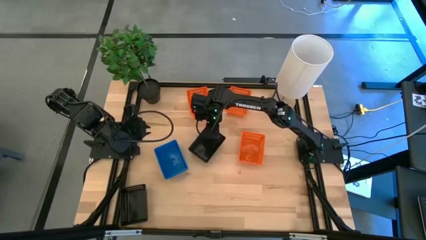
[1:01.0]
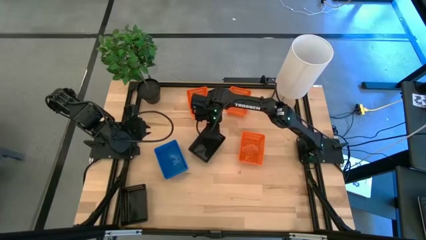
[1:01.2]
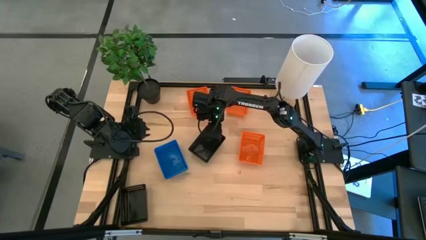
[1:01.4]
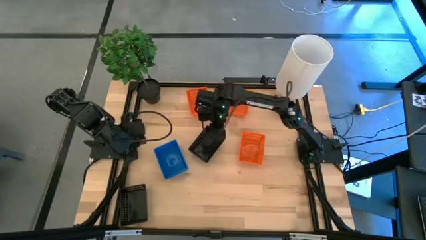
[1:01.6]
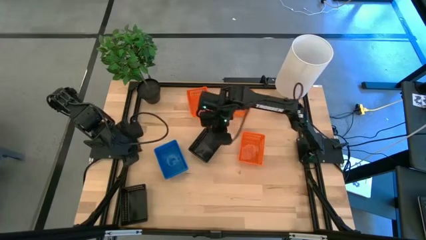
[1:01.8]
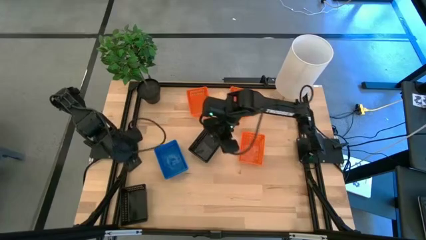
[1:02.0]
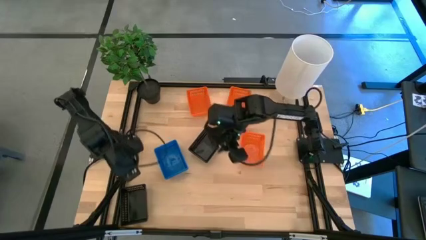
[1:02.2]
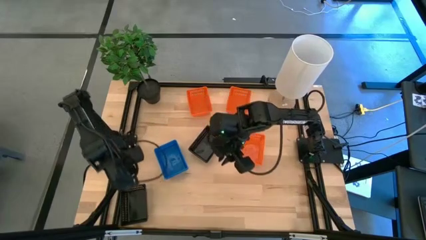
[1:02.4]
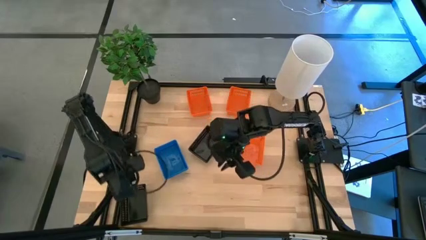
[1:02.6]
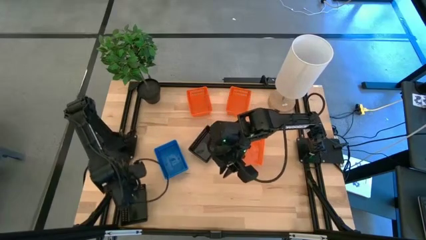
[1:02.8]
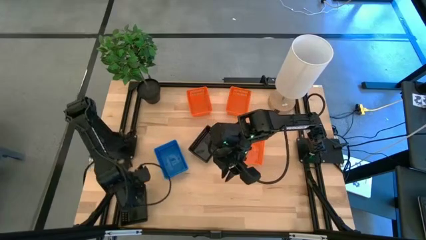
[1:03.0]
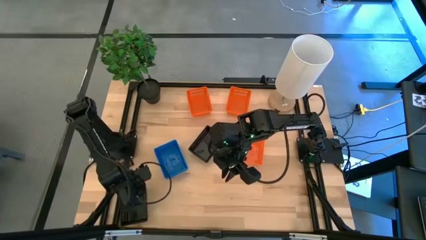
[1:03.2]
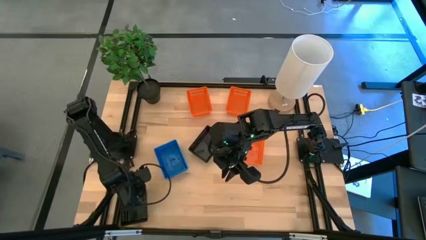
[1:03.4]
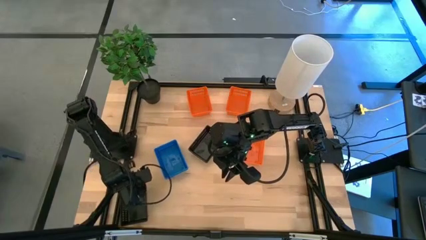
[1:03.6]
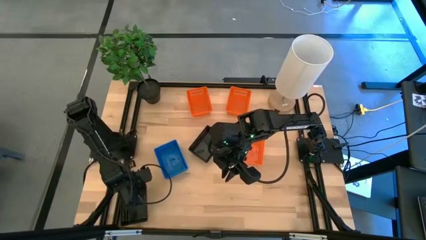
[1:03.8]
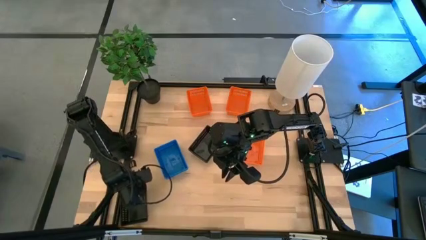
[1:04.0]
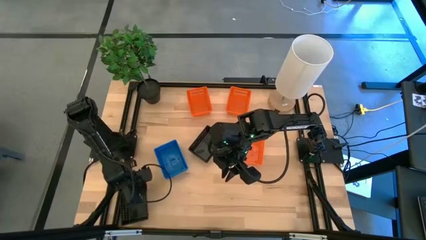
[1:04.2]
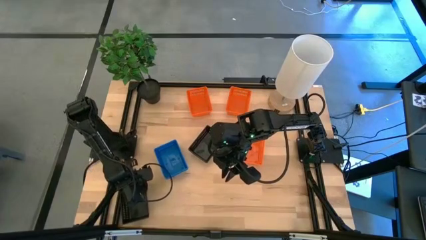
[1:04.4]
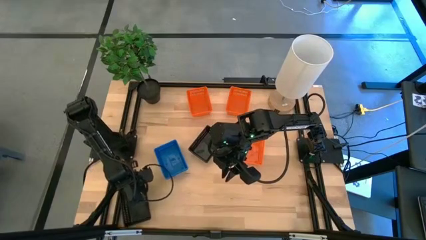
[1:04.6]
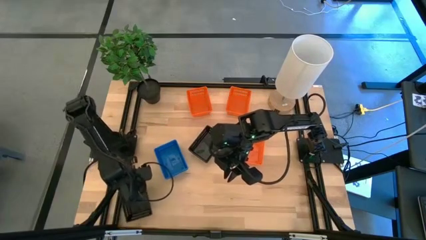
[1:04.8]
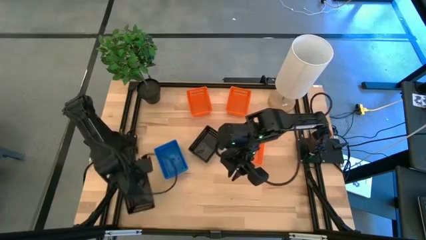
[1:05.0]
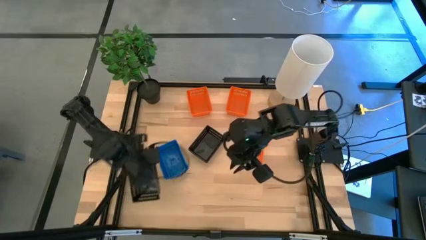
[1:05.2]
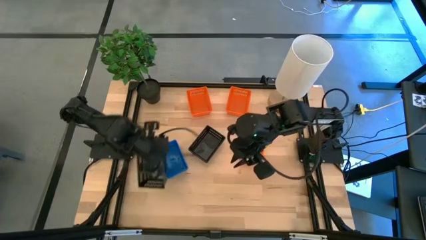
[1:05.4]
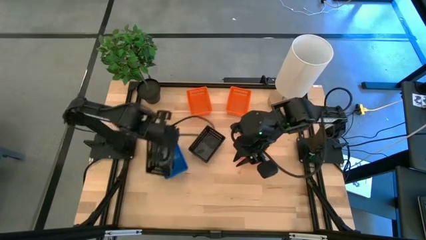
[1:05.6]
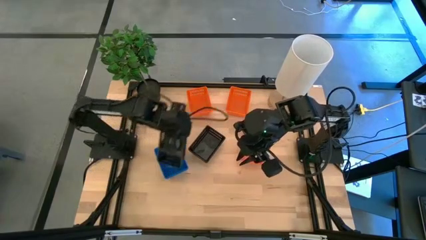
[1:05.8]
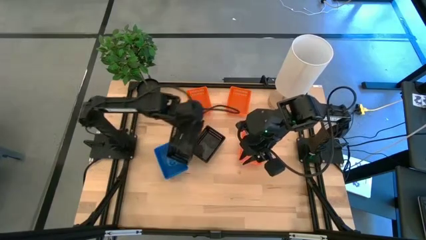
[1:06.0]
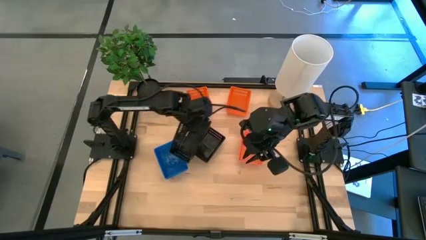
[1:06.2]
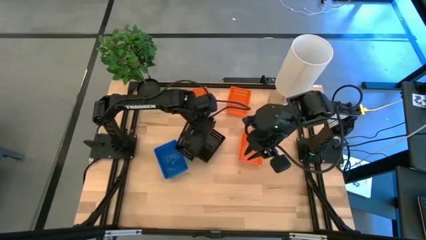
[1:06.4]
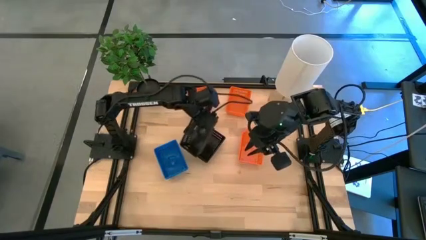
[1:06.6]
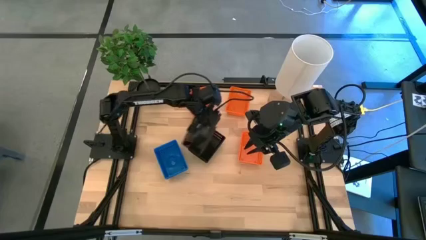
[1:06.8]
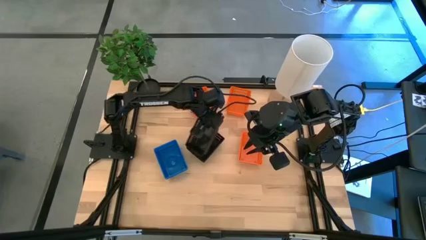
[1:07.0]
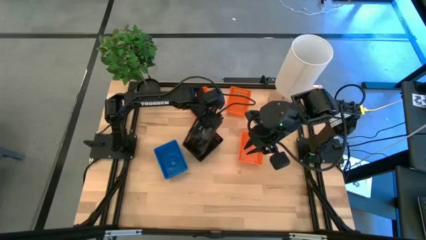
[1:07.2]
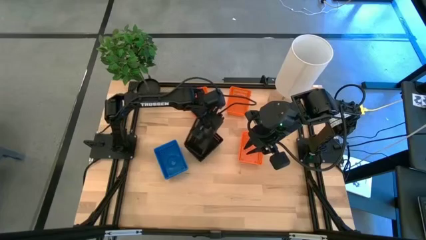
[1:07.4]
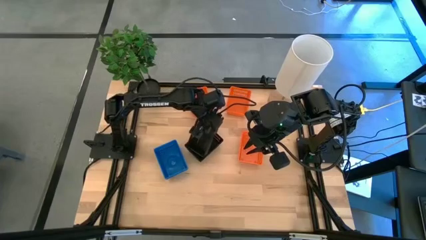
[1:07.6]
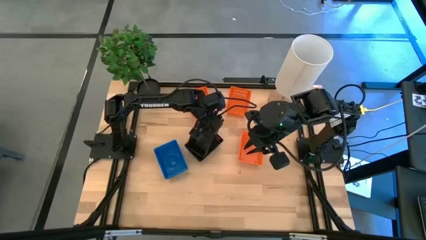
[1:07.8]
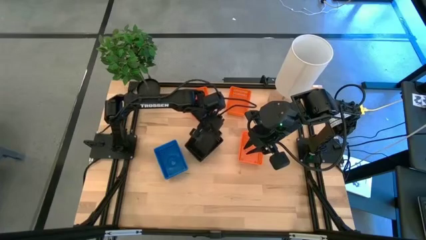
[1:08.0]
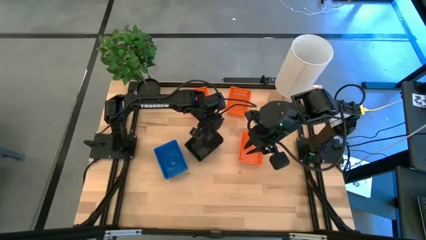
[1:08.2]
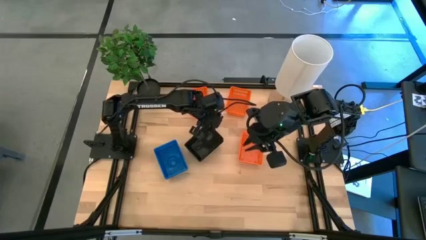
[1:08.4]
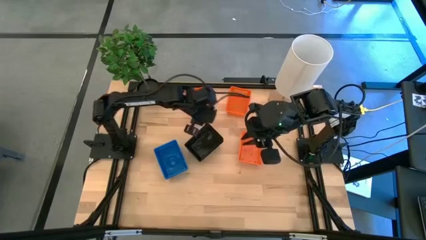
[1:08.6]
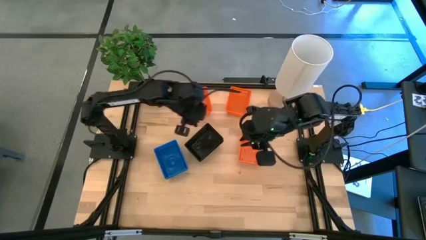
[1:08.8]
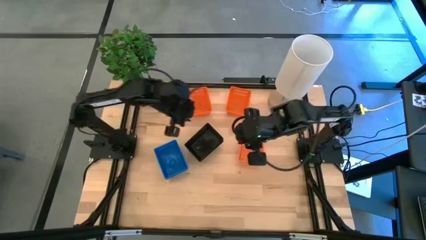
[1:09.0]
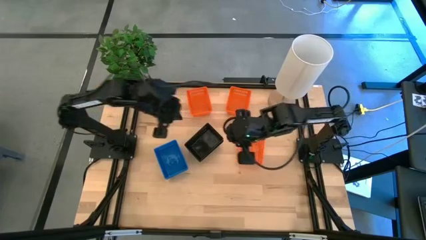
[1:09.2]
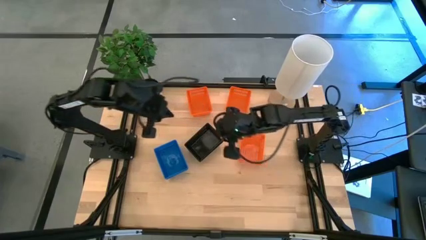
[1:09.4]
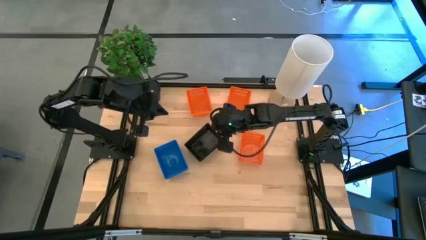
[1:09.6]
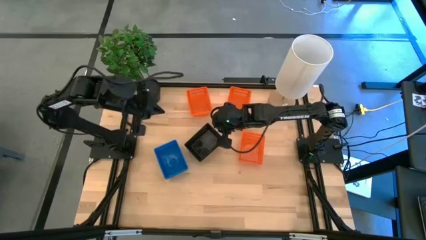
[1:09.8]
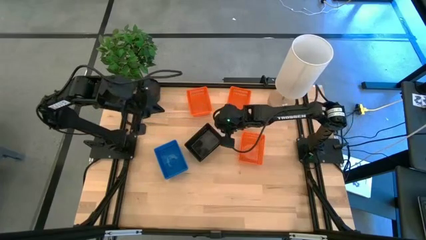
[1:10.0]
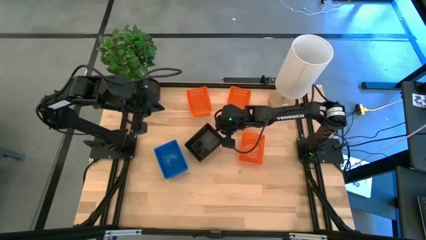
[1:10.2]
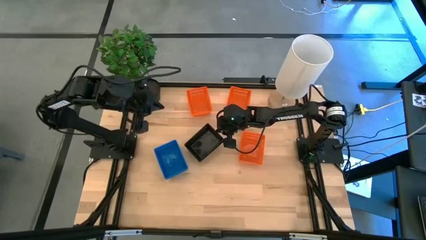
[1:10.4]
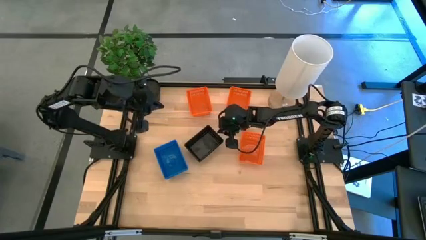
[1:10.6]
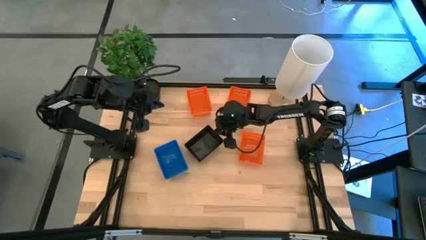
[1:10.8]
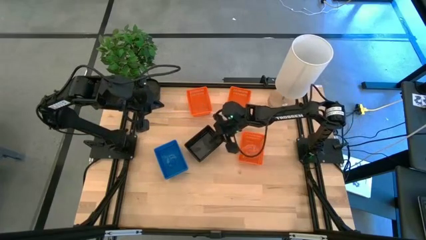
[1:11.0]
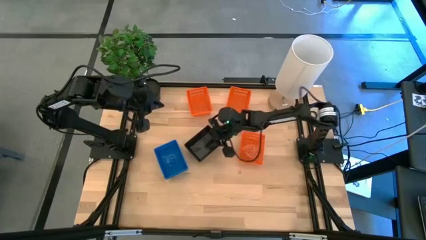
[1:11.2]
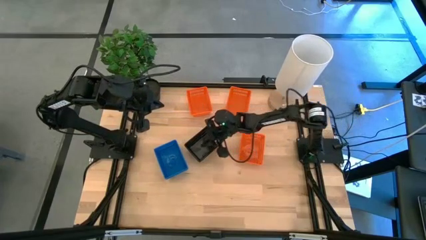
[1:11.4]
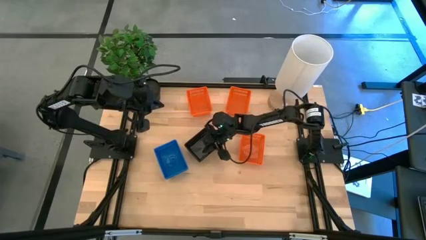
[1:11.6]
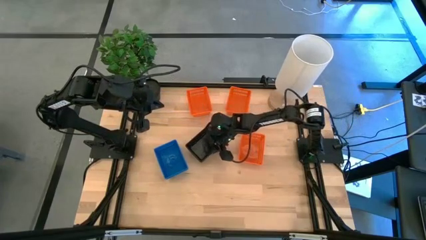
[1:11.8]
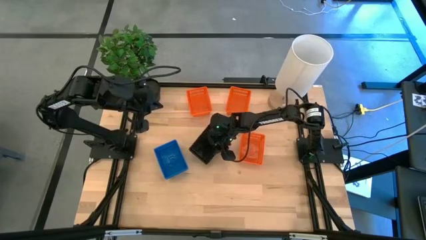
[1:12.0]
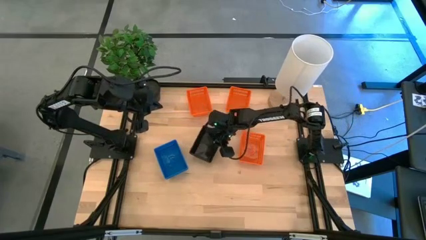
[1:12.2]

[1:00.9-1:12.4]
Stack the bottom black bin on top of the top black bin

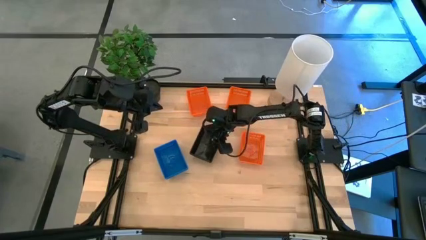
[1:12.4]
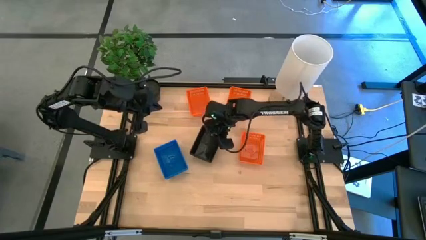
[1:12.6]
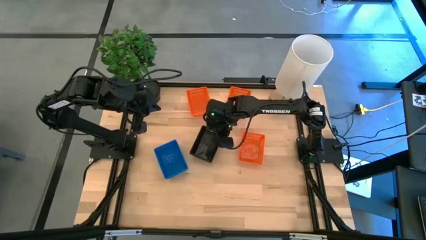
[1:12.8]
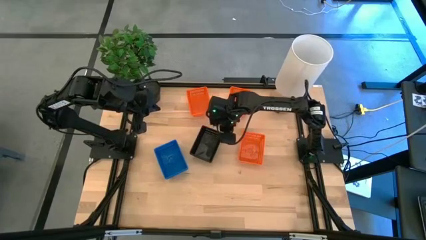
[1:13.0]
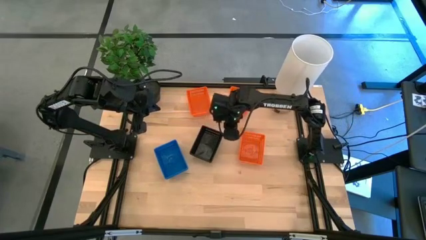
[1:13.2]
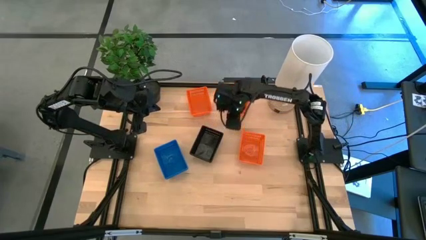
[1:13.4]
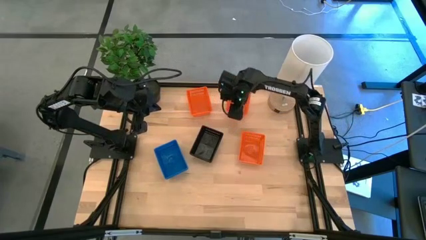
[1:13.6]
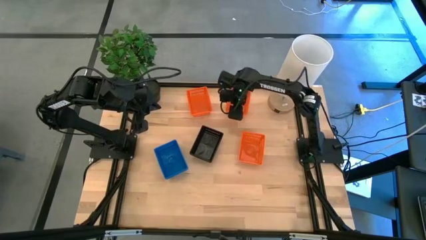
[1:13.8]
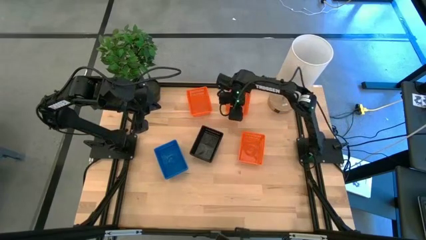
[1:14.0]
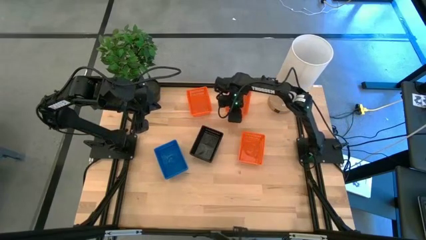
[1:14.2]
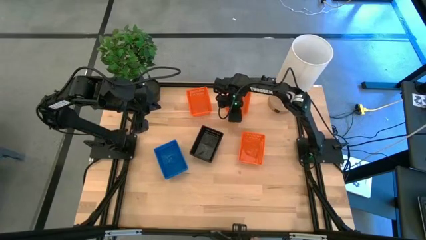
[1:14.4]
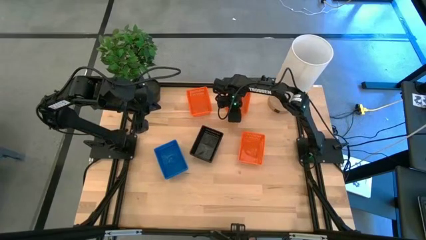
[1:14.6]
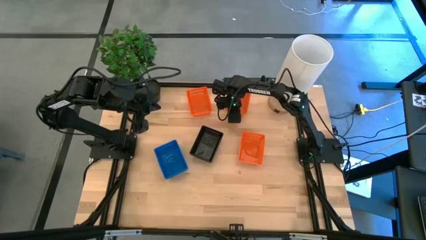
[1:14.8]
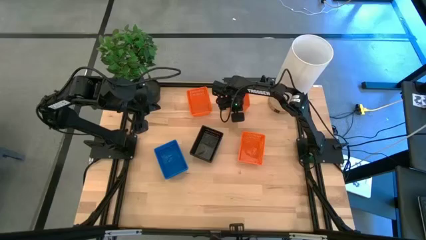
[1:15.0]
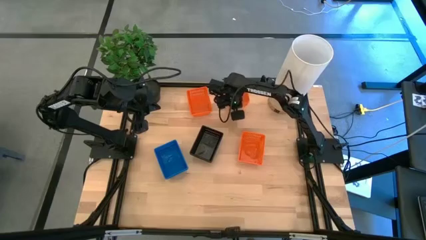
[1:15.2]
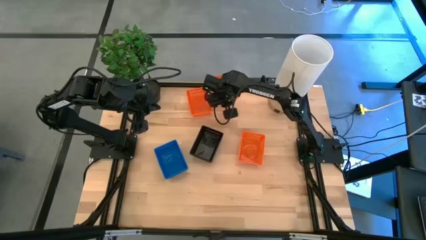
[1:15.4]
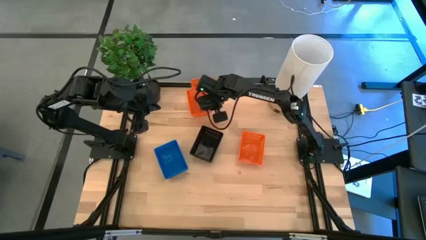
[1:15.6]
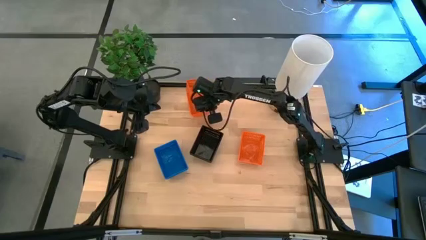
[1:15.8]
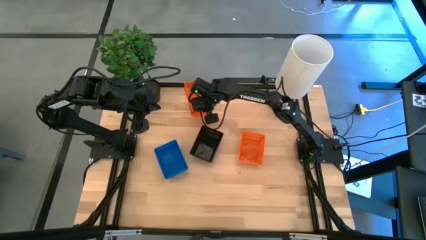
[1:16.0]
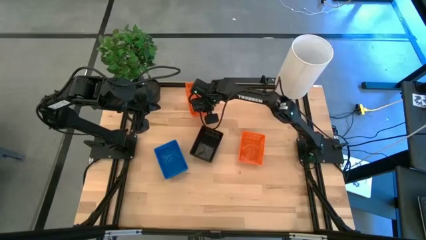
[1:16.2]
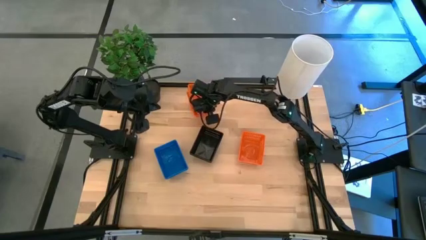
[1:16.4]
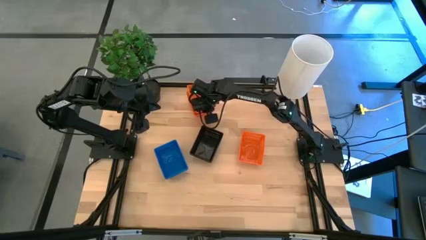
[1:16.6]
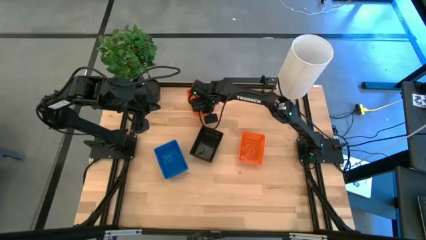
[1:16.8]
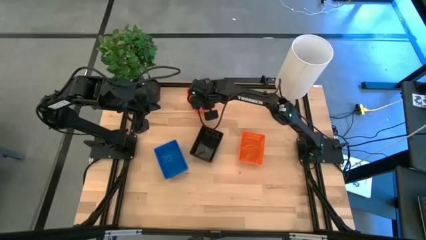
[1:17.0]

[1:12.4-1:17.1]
Stack the top right orange bin on top of the top left orange bin
